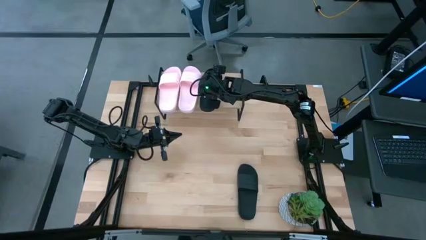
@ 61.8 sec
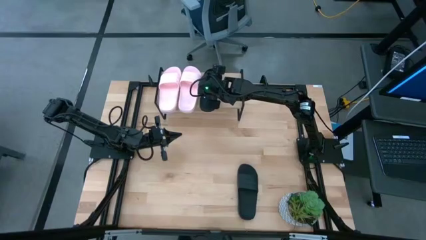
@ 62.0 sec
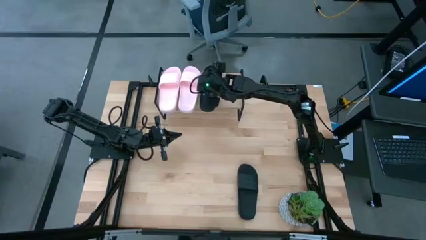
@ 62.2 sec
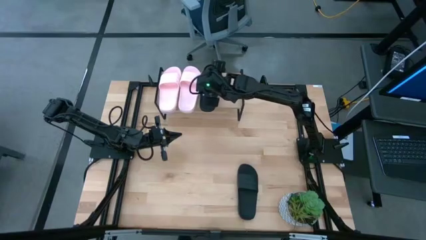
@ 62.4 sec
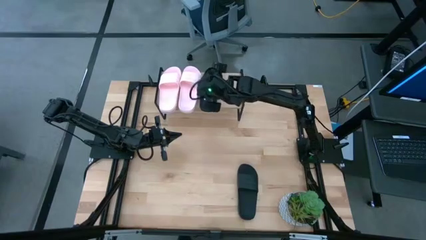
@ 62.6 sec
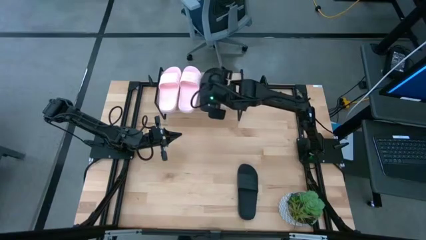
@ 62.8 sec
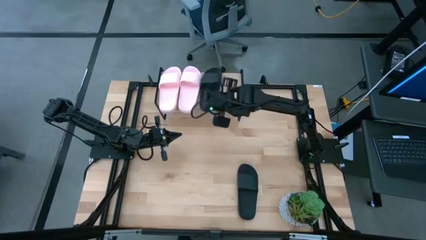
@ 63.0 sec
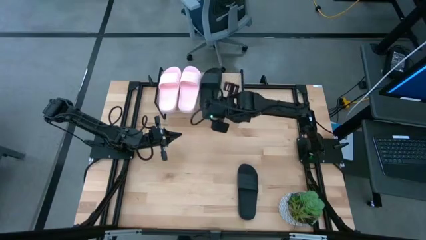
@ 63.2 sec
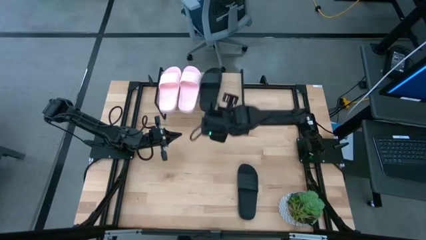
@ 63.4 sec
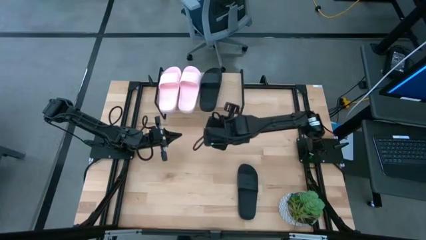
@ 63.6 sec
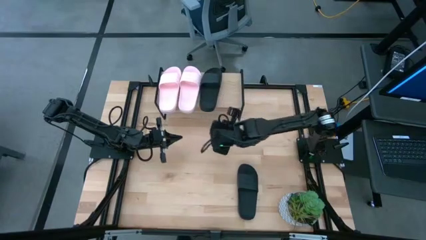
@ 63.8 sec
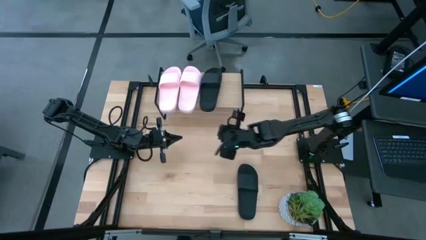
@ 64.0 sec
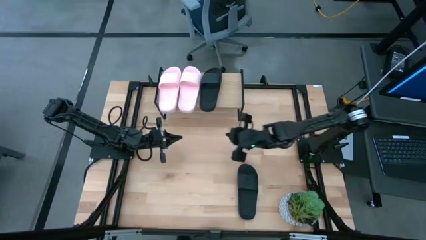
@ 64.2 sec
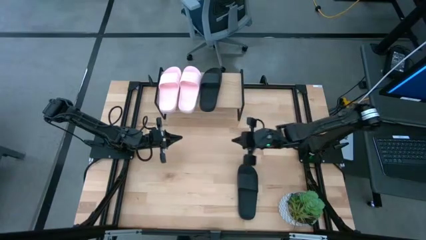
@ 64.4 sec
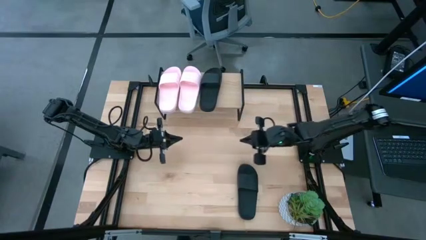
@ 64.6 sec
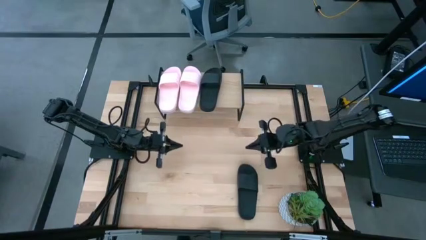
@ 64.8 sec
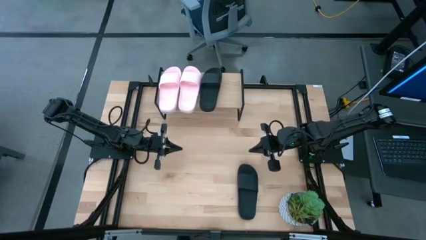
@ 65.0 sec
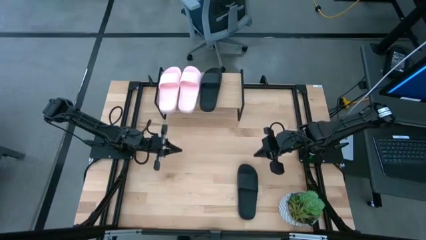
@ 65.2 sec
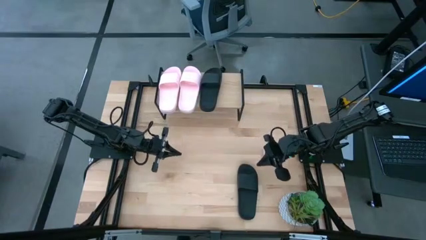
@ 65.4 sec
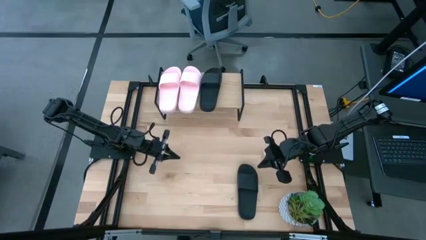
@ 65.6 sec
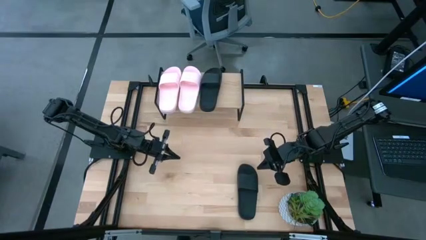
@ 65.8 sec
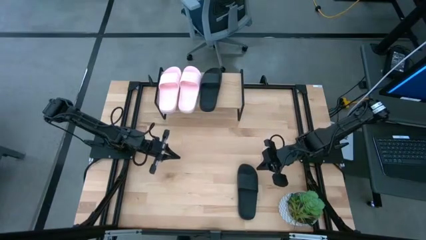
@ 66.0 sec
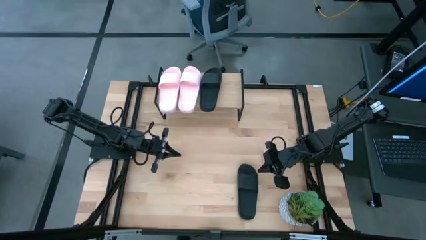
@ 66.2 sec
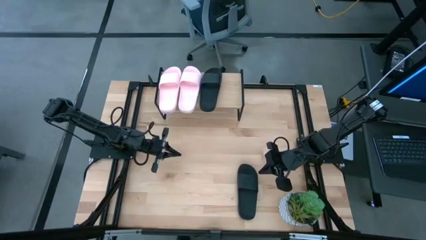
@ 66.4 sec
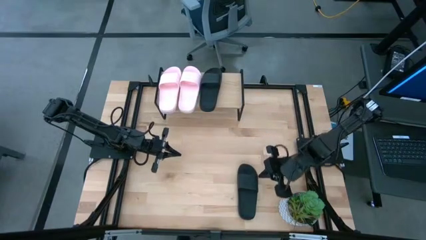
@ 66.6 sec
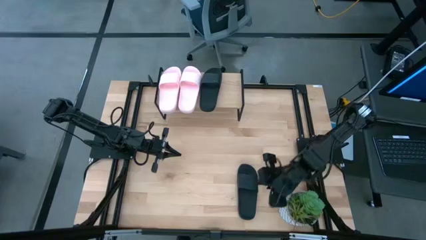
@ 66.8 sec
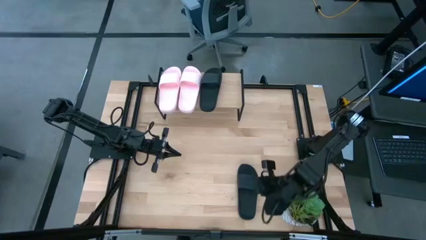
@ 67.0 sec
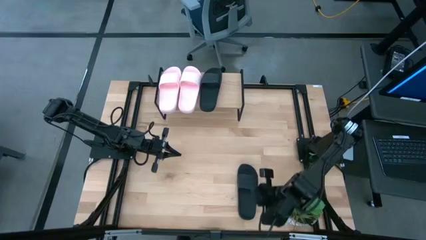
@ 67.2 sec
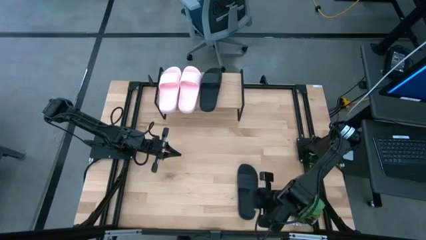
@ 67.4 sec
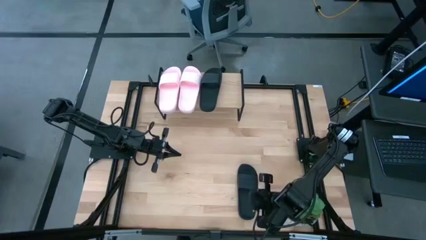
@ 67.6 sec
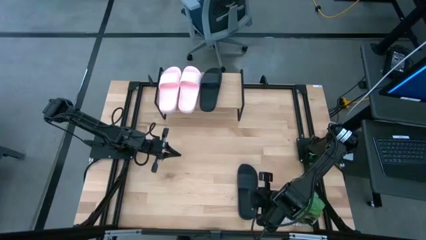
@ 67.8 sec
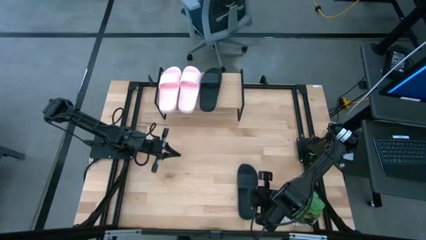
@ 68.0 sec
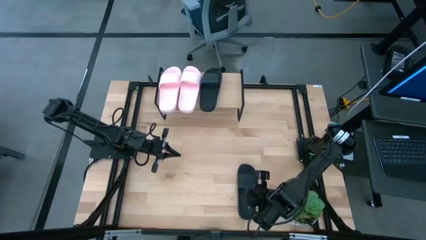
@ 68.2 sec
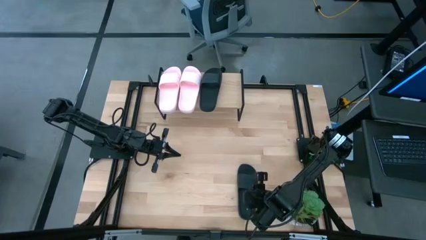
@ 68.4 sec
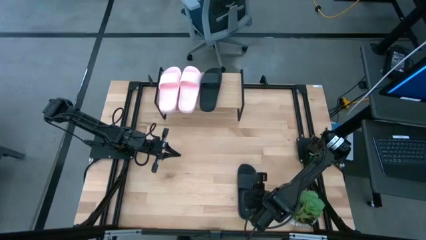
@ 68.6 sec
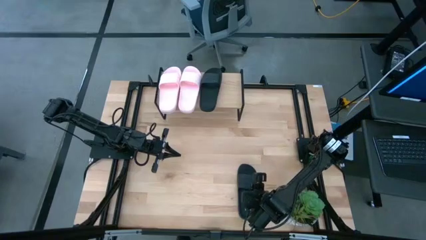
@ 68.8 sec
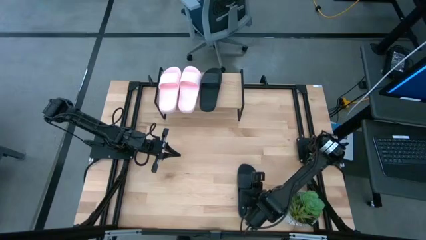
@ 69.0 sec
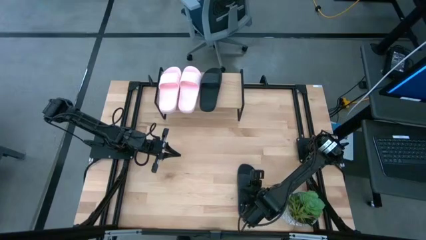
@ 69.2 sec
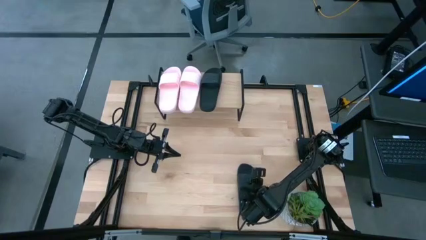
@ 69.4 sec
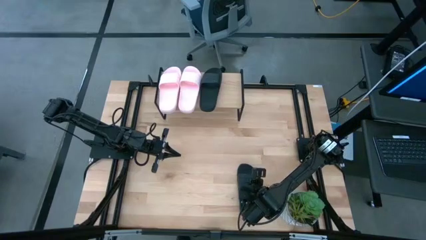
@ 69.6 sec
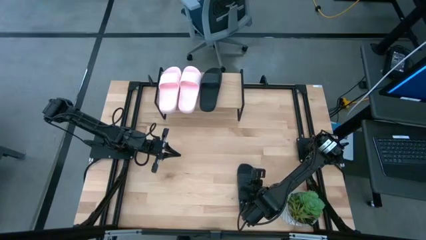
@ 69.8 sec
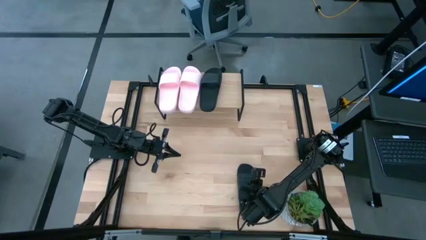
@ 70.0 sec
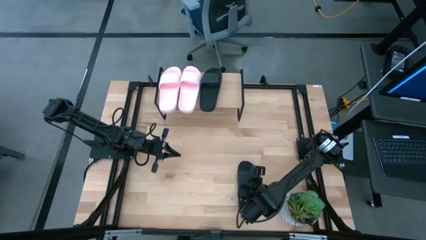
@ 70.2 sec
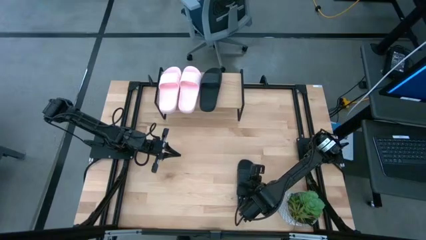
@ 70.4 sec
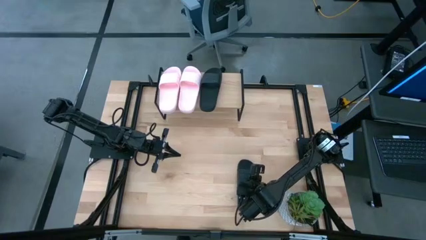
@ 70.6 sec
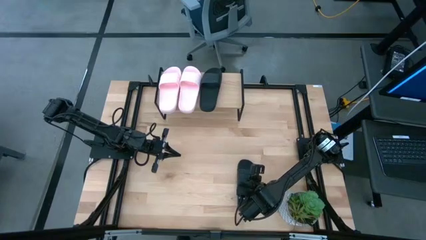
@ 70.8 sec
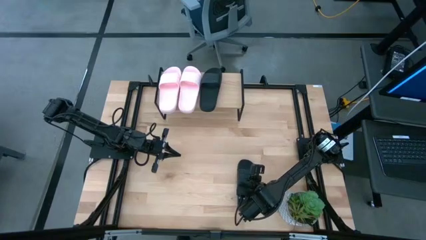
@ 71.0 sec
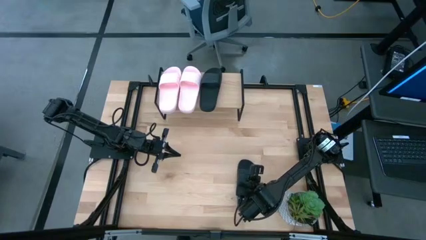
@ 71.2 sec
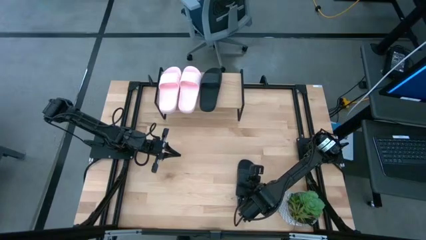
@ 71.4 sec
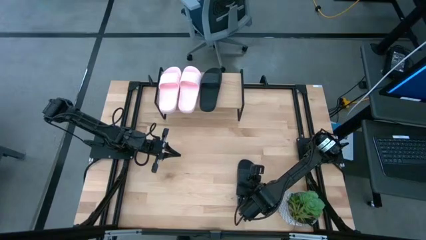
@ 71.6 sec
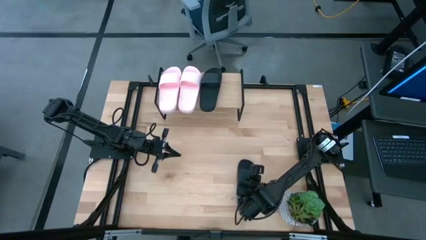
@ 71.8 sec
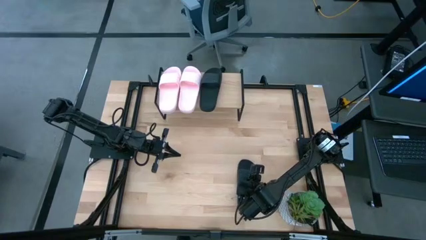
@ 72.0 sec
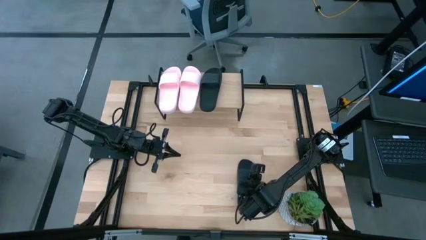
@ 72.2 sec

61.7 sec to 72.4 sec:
Task: Pick and place slides into the shelf
Put the black slipper on the shelf

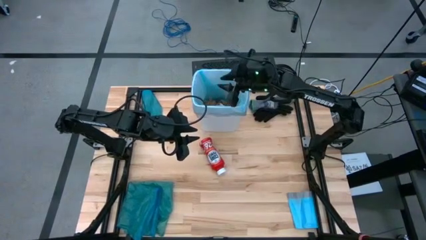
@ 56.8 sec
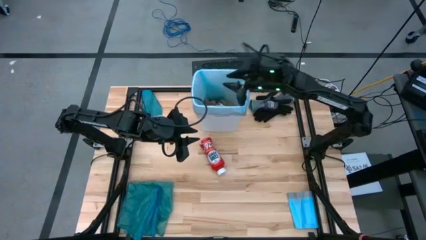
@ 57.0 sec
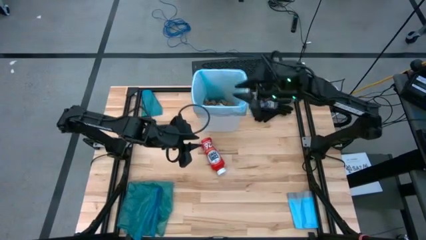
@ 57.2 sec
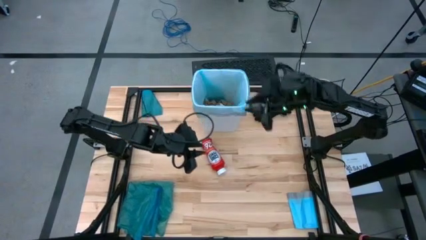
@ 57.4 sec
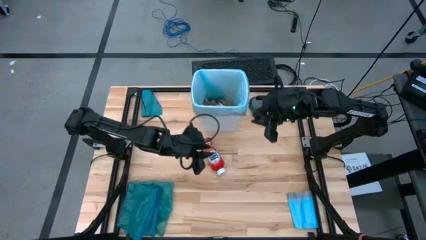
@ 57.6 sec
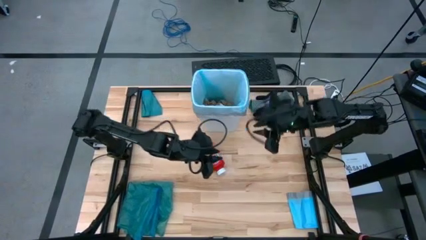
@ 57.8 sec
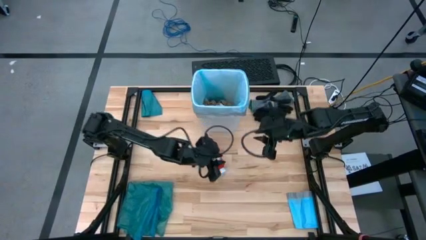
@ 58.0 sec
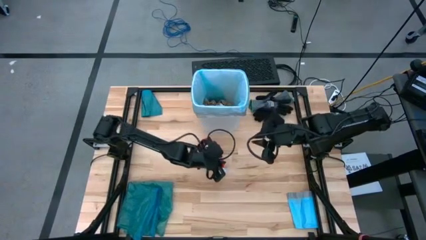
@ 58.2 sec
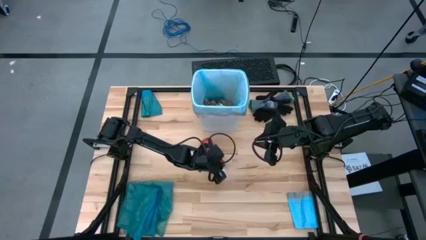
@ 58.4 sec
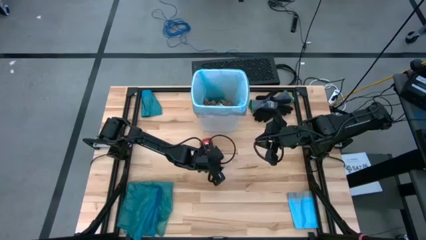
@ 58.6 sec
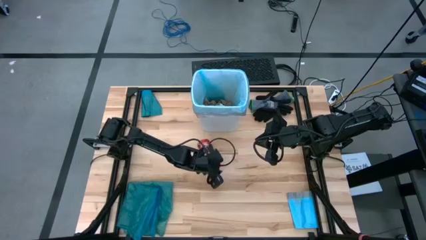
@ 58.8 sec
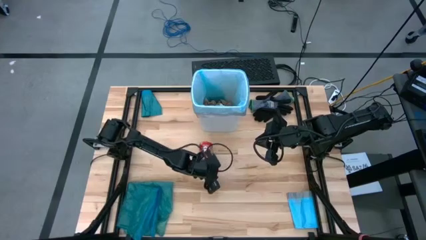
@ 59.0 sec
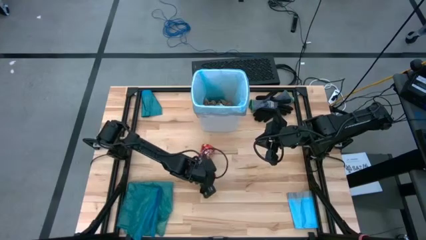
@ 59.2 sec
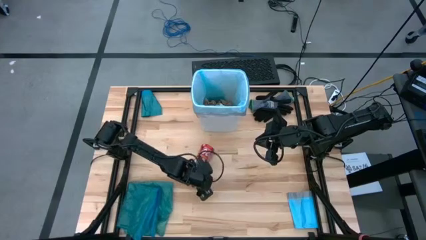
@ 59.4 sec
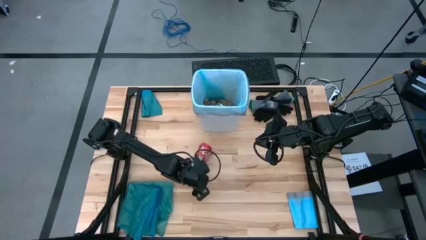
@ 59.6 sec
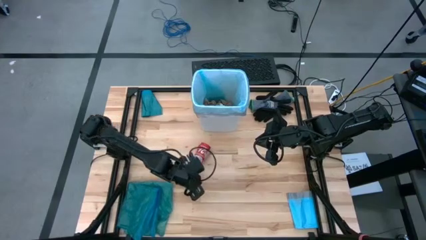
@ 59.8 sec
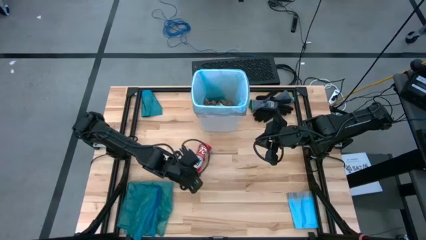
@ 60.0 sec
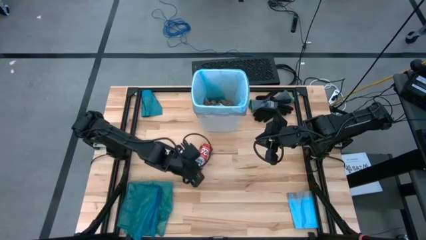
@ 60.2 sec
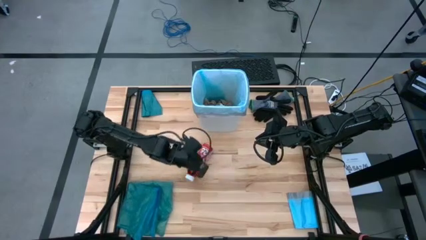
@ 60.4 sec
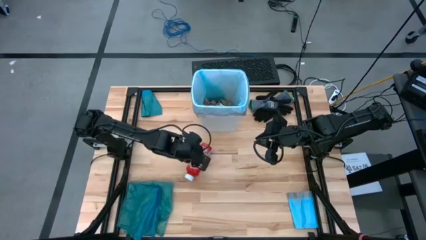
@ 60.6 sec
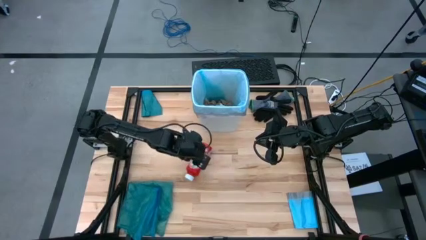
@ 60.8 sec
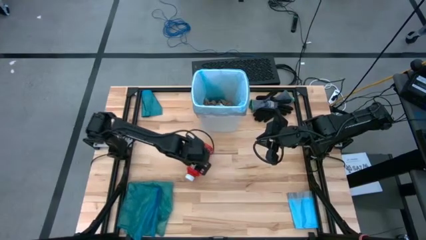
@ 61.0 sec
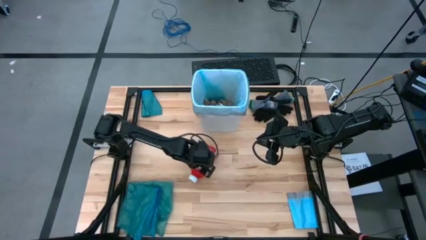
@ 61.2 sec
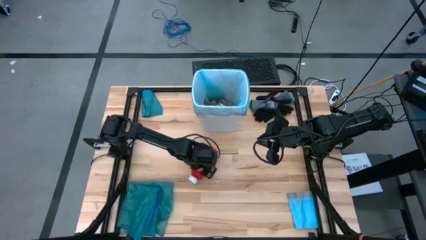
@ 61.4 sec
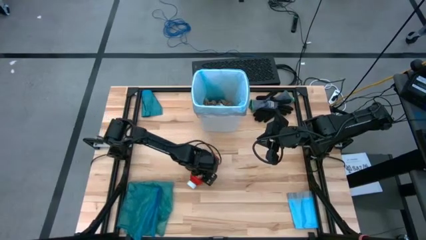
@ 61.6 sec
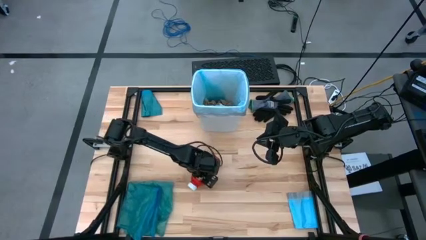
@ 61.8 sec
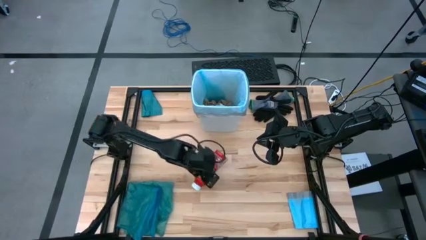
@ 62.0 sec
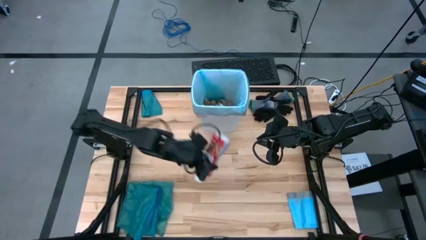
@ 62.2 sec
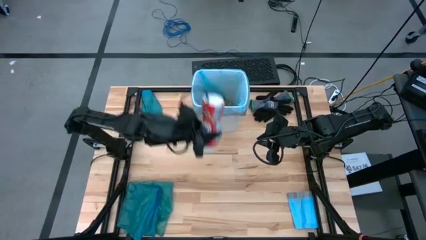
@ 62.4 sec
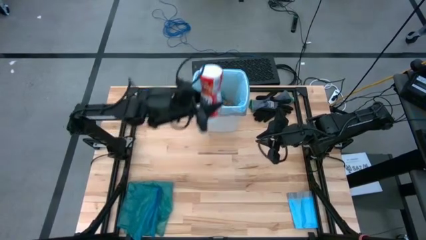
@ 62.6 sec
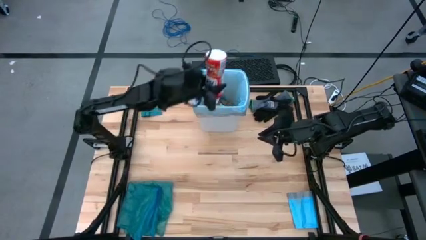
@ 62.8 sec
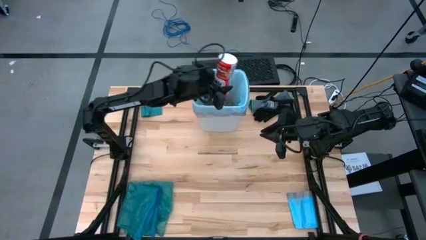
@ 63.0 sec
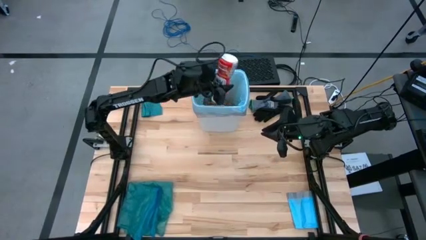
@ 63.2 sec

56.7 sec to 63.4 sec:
Task: place trash/remove bag and relplace
Put the red plastic bottle into the white trash bin
